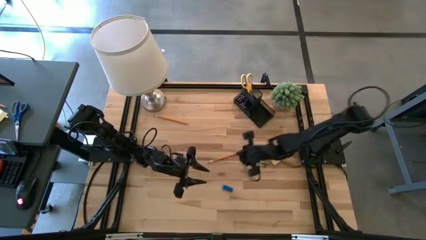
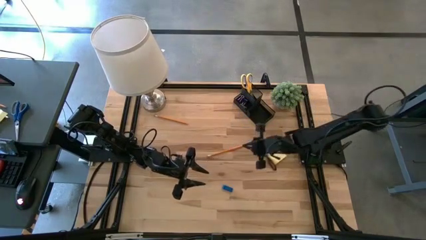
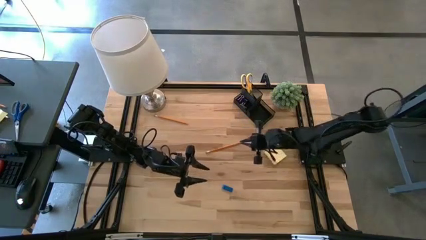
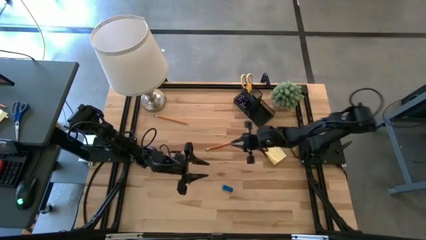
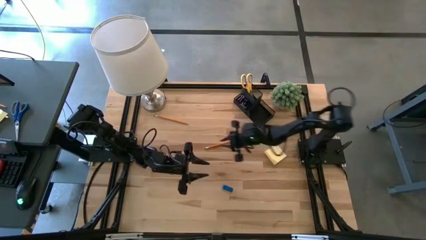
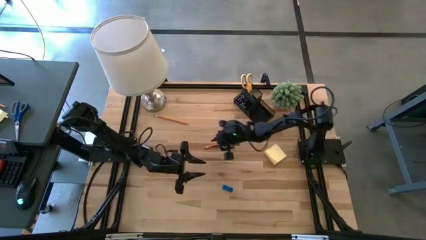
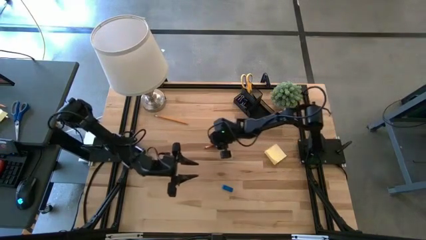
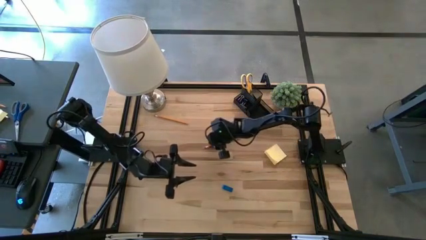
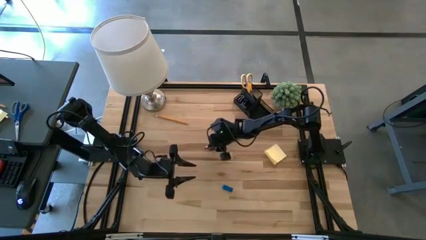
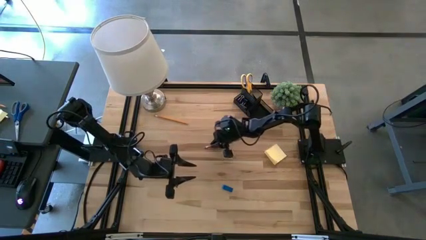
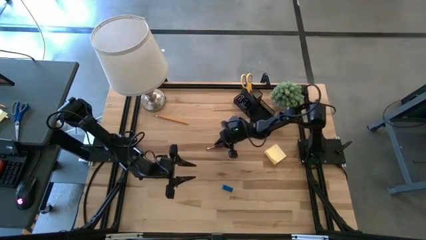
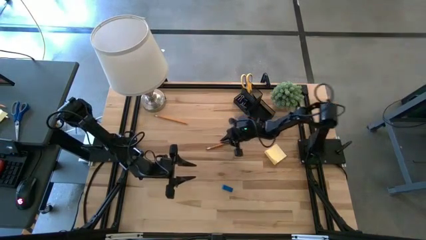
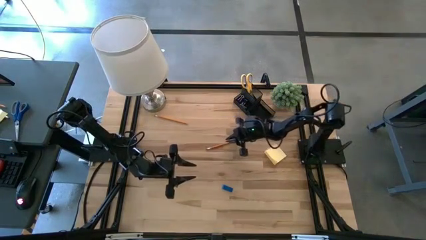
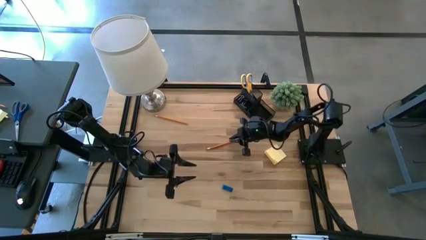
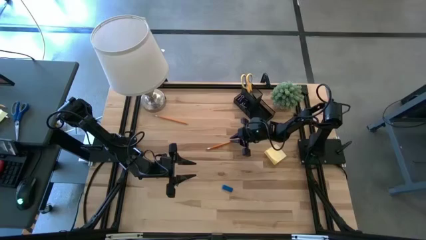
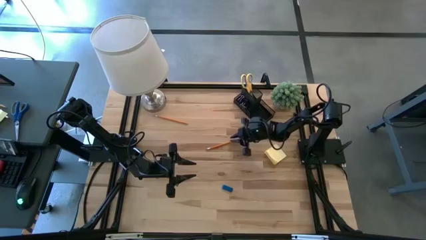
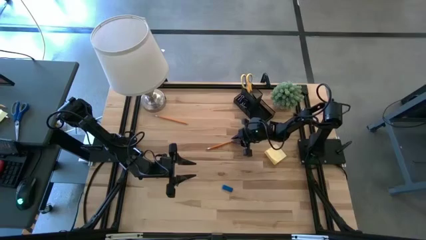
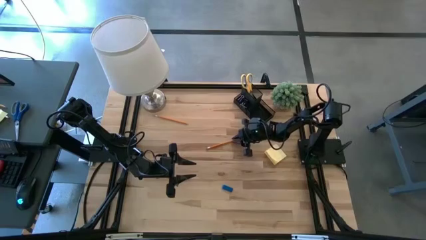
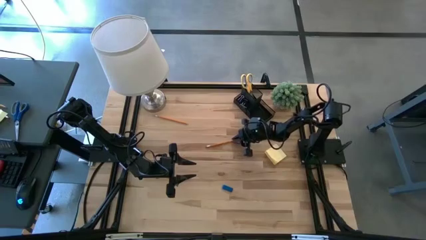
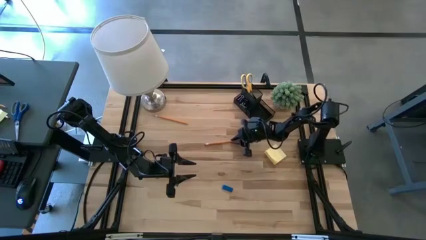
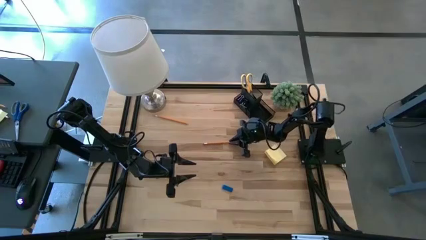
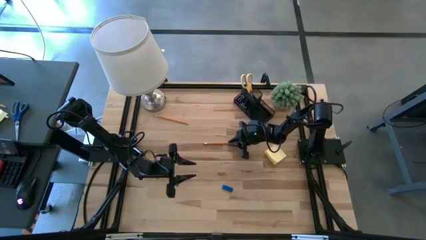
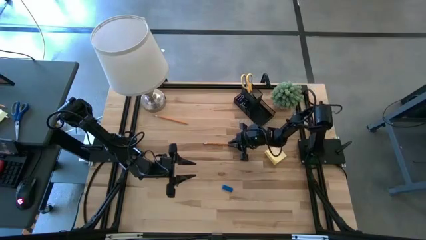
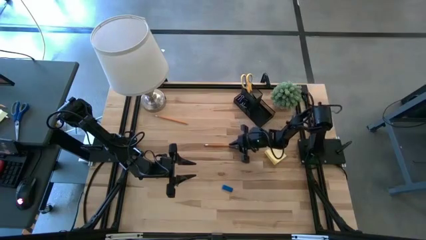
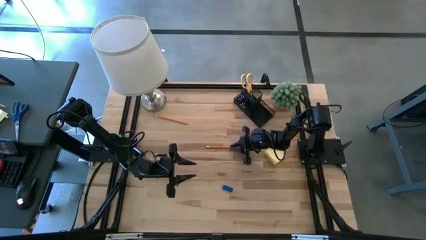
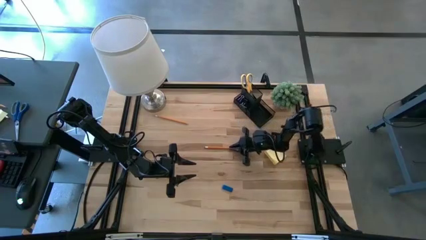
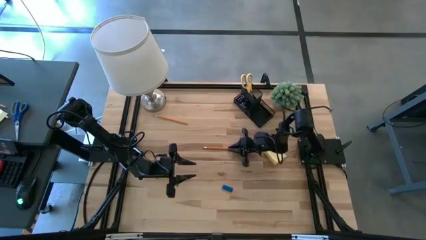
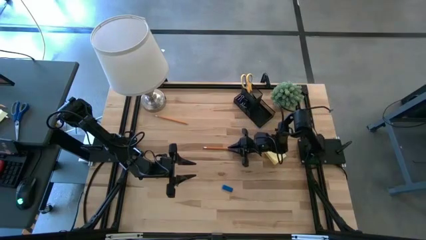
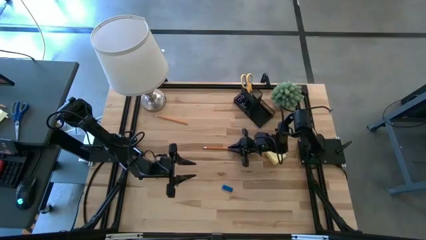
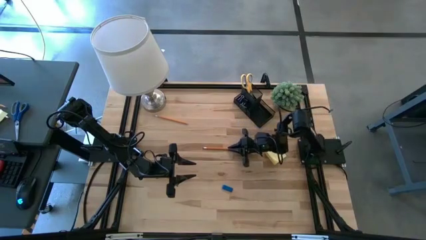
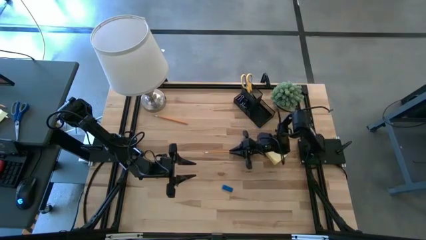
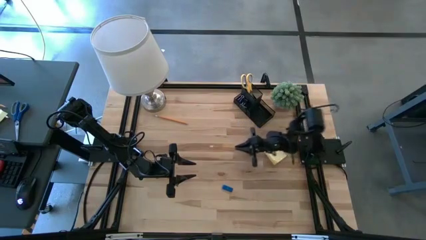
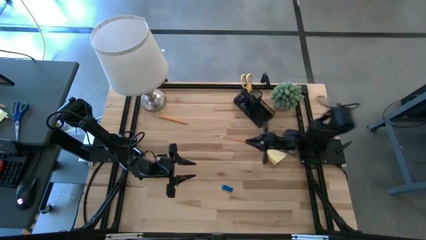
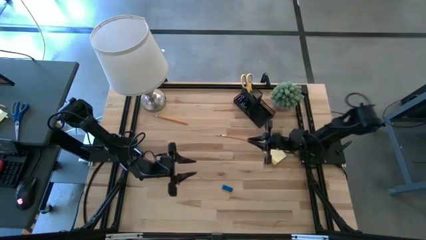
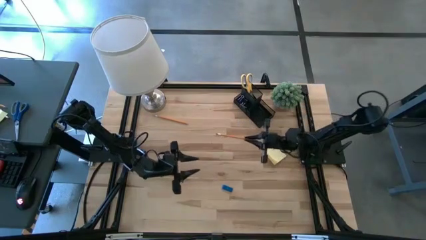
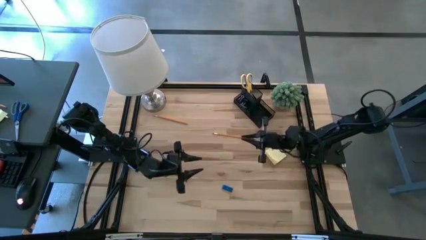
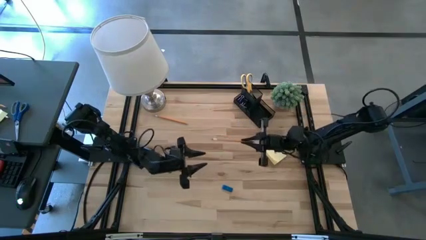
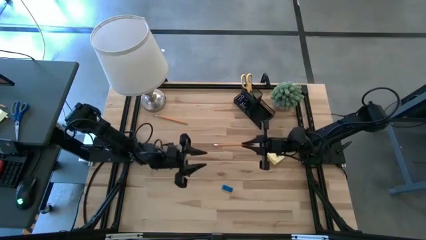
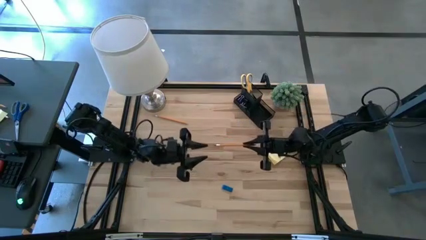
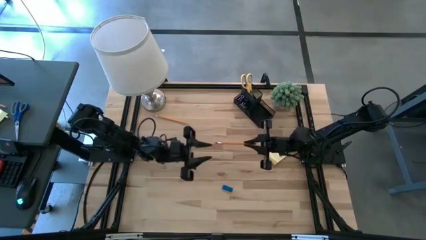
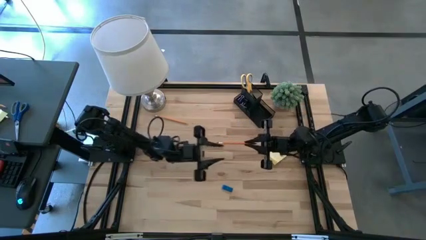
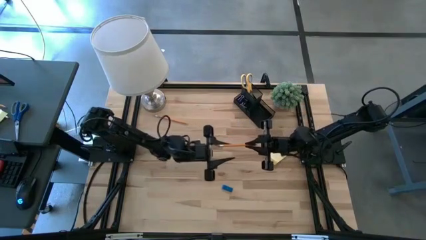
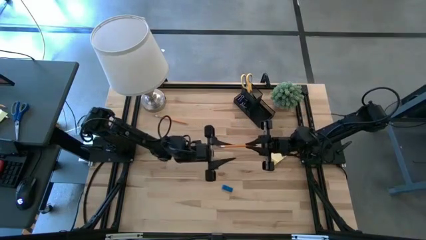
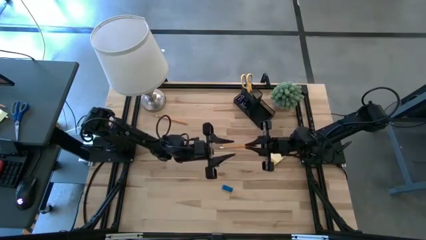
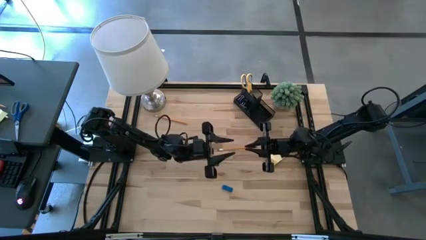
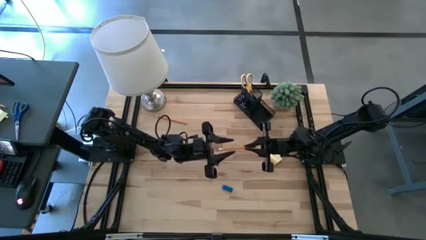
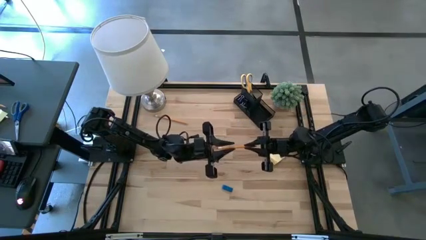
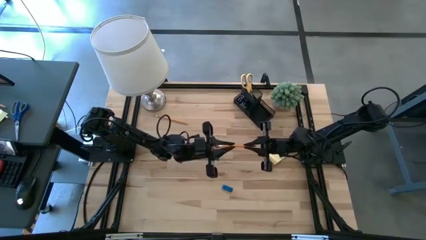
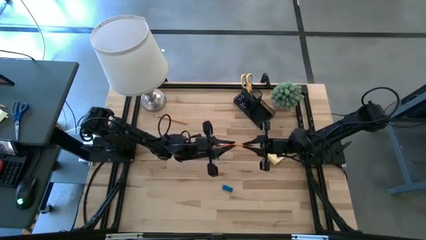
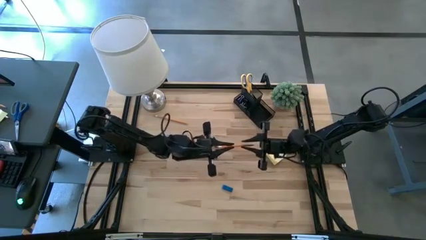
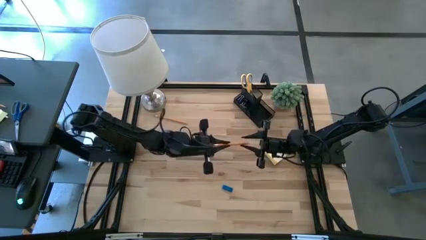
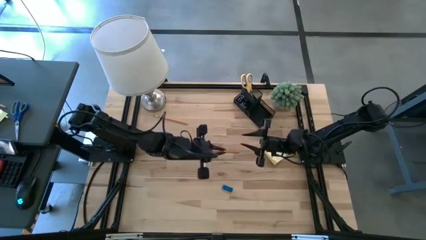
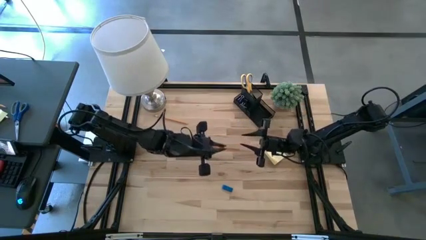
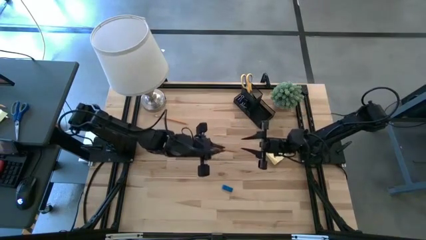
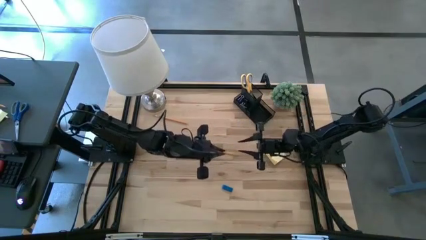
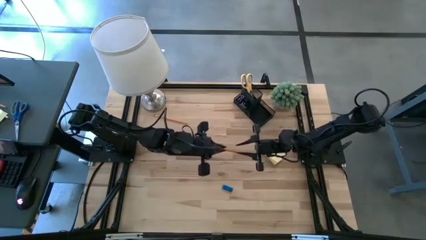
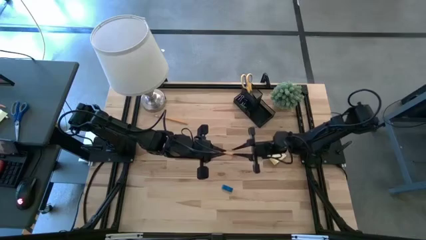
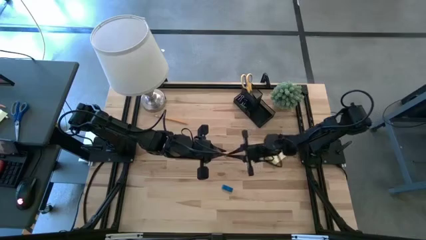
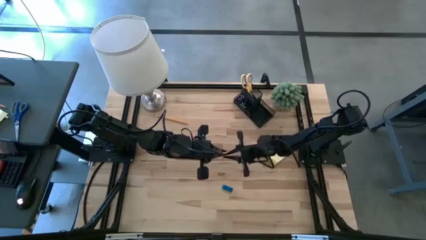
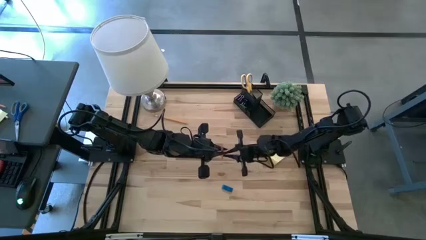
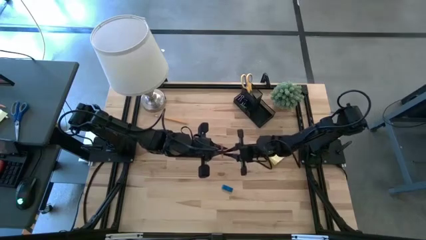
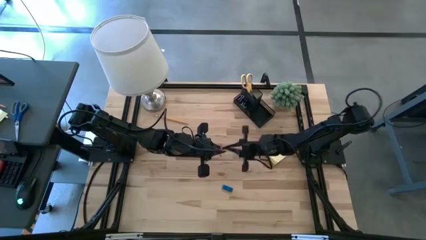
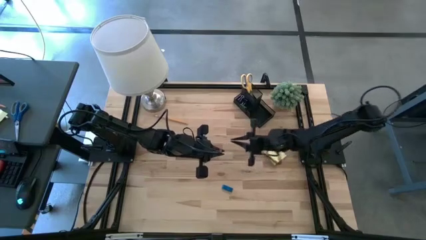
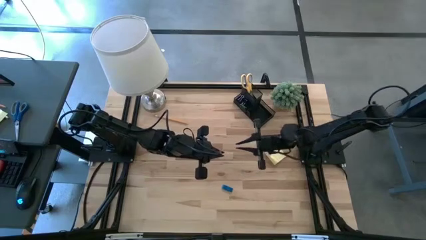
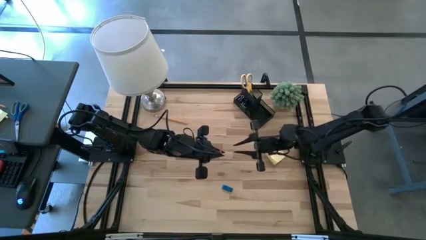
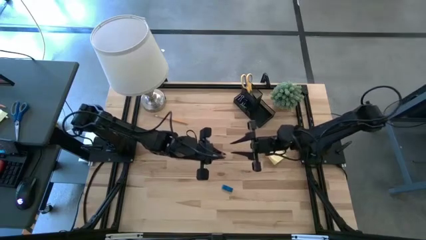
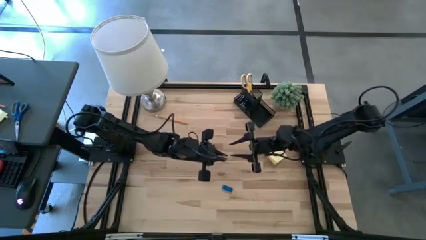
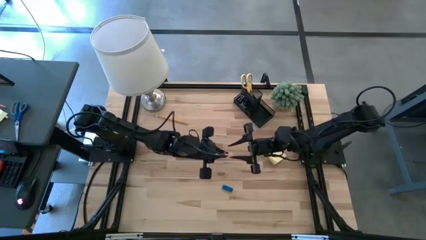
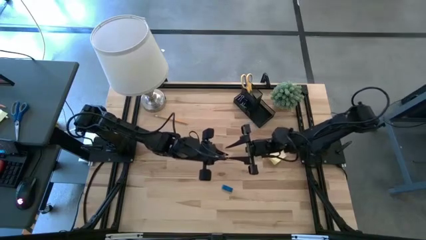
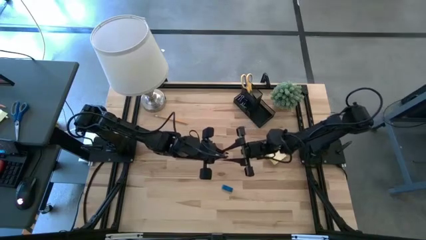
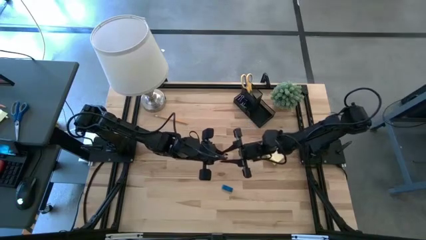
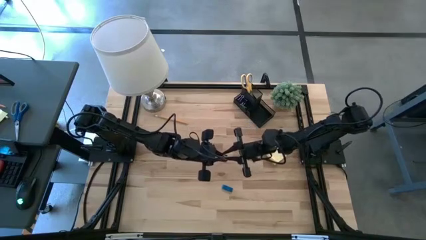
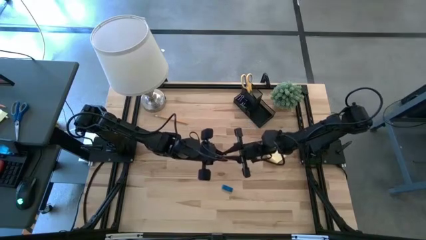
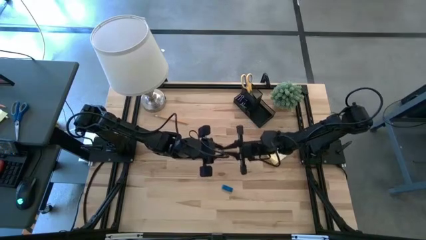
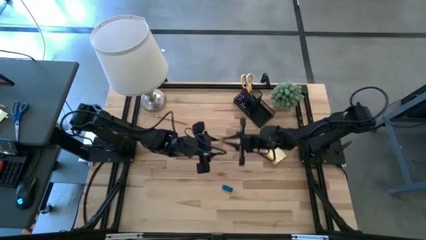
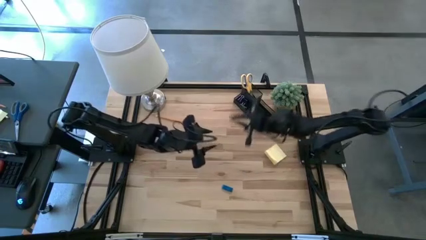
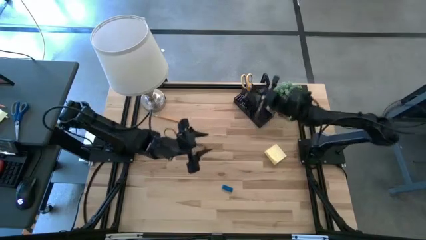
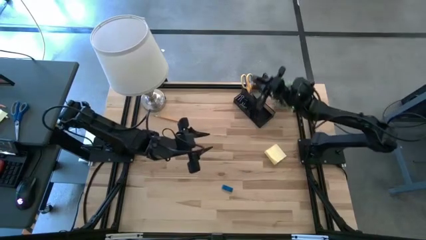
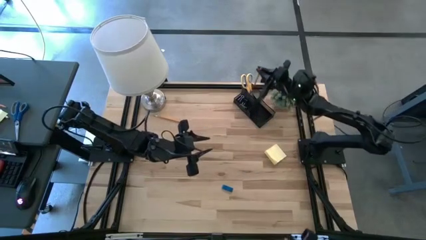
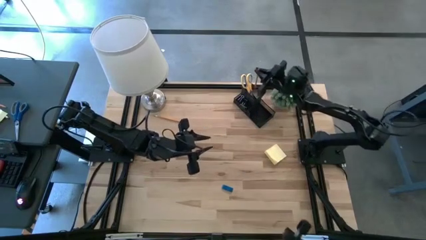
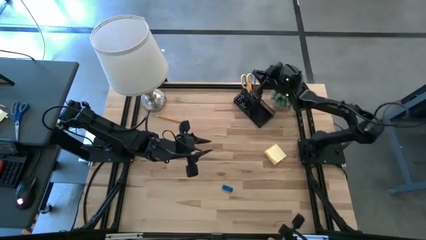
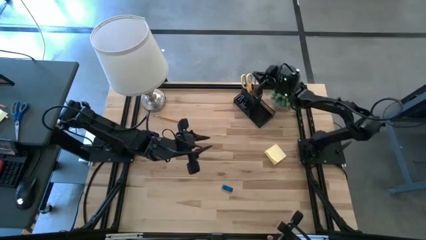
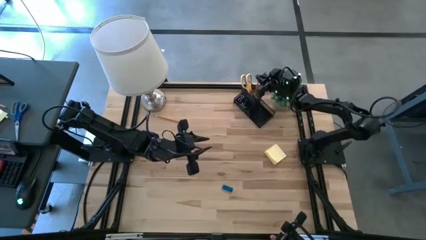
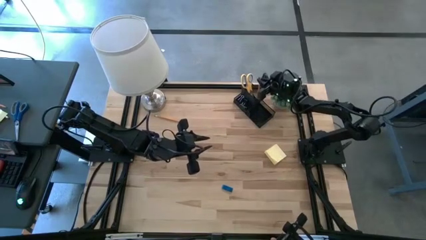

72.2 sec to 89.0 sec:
Task: Pick and place office supplies into organizer
Put the bottom orange pencil into the desk organizer
